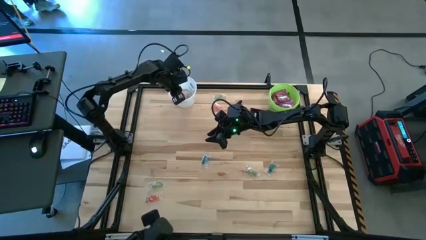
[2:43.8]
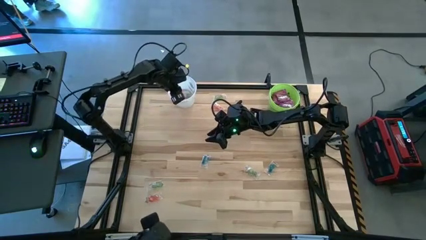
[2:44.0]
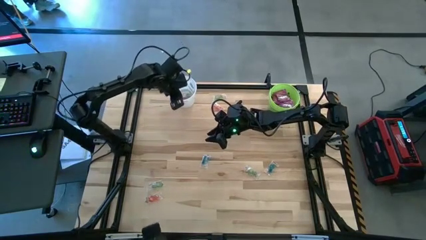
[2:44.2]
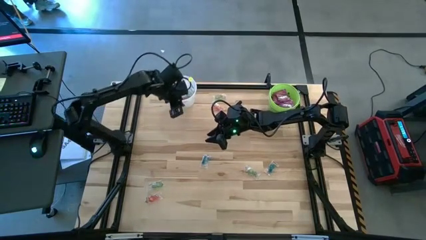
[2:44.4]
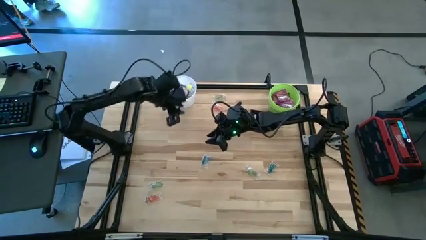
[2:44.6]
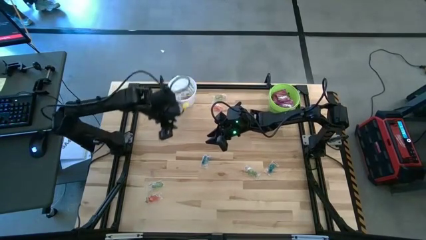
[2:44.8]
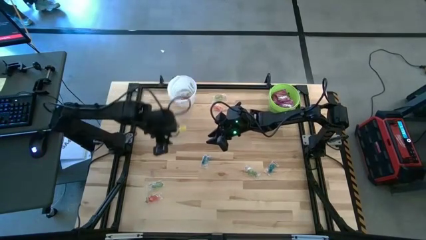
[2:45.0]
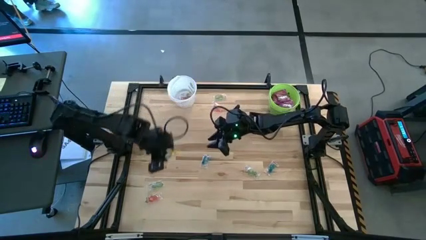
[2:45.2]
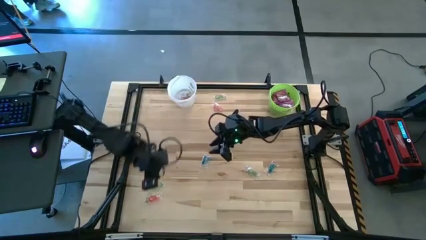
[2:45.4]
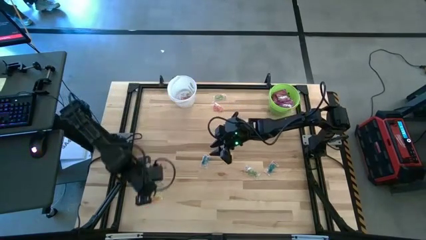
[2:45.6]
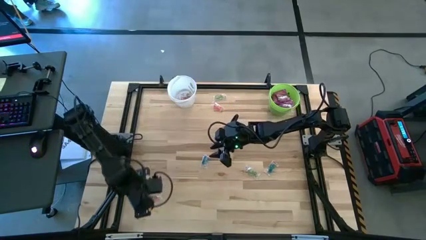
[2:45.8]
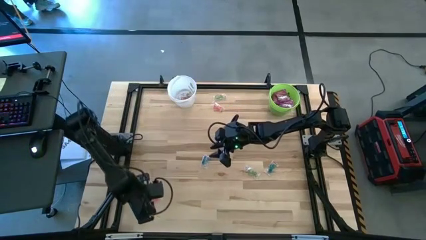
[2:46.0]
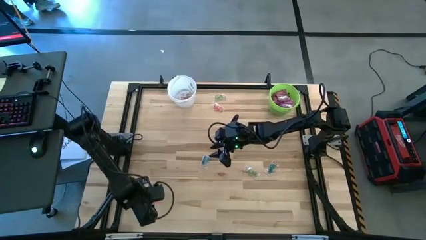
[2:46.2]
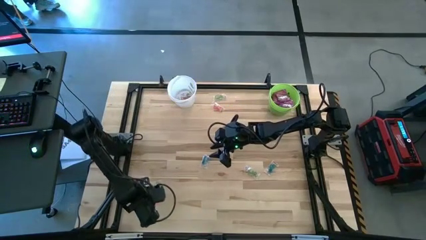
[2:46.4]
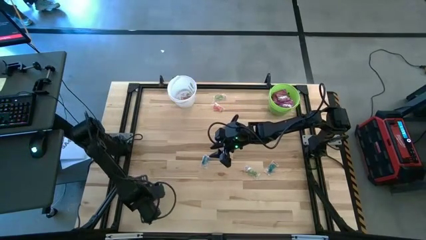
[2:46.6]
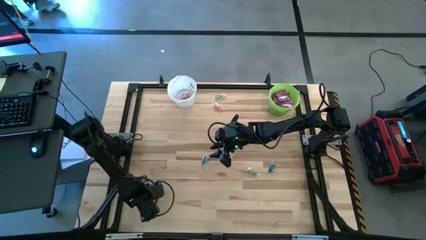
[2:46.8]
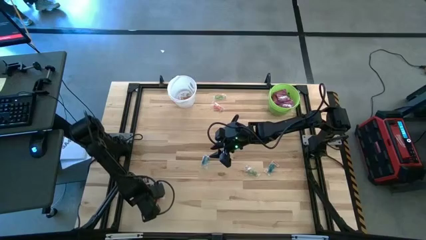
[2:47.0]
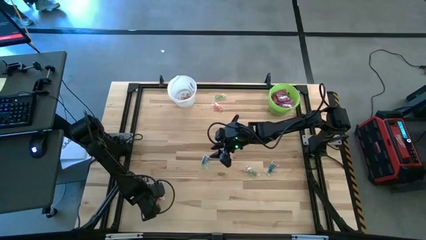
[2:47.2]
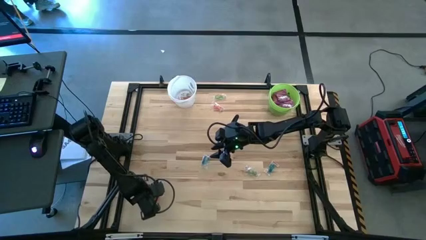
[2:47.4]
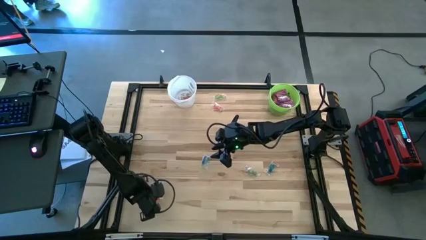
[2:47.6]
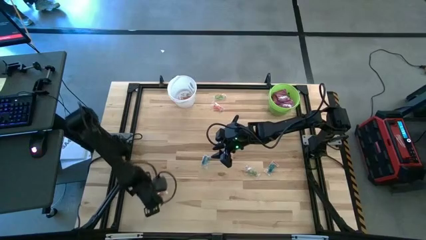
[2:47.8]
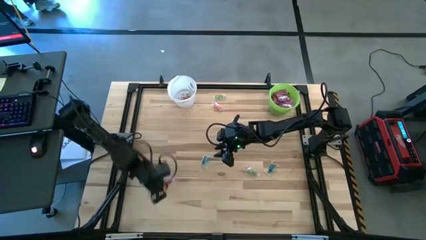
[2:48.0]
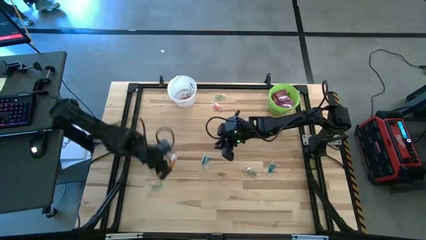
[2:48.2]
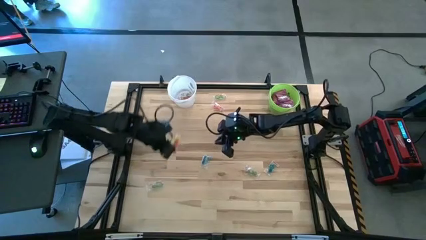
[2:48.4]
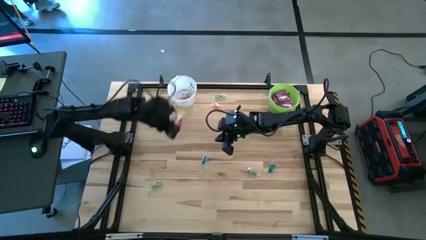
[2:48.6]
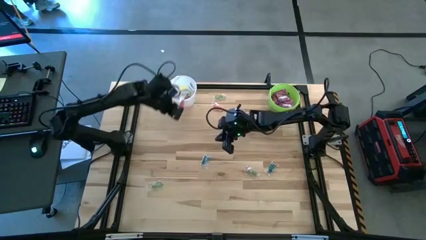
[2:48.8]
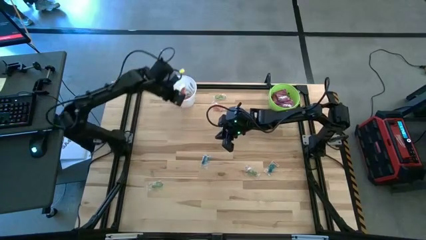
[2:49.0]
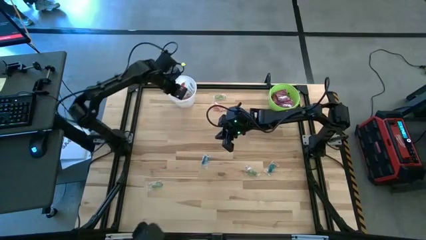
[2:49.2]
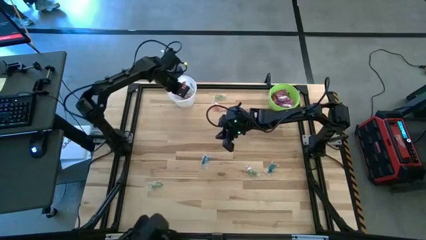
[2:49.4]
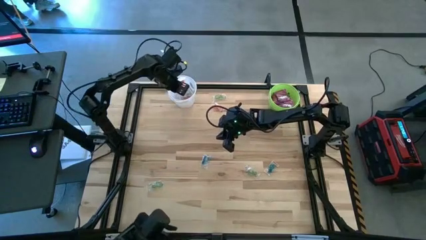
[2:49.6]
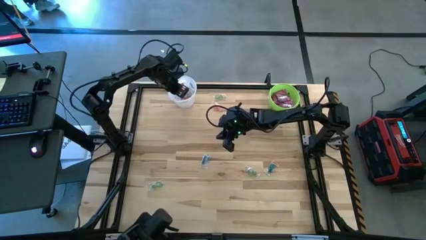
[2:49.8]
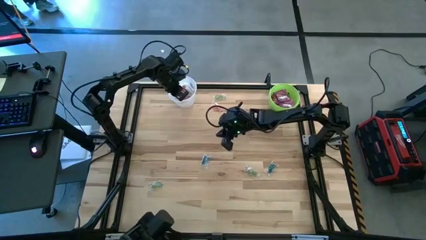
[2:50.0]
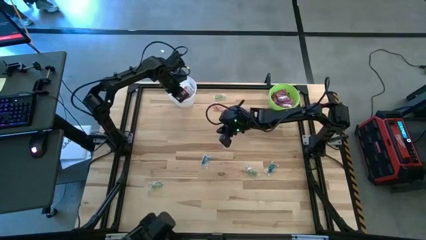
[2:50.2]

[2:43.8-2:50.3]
Task: Sort candy by brand, put in halloween buckets
Put the red gummy into the white bucket

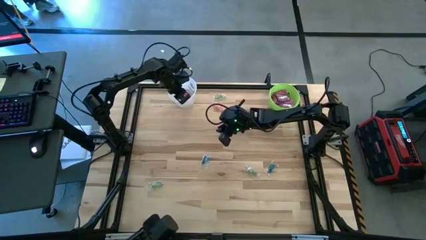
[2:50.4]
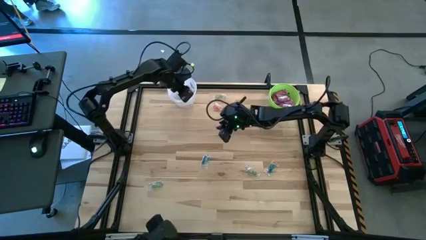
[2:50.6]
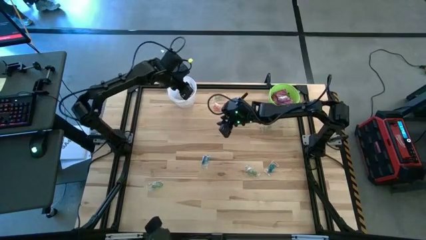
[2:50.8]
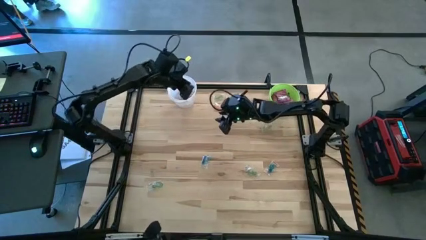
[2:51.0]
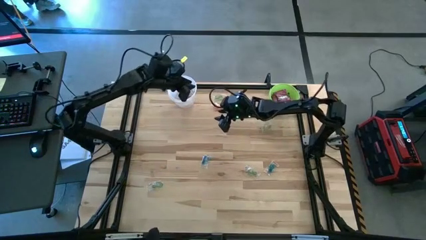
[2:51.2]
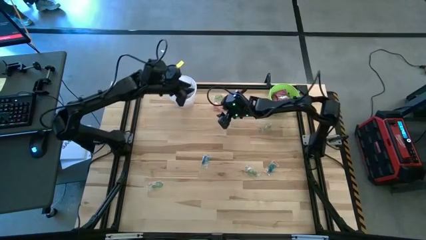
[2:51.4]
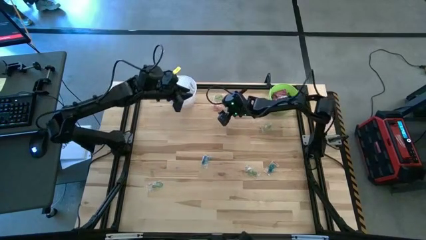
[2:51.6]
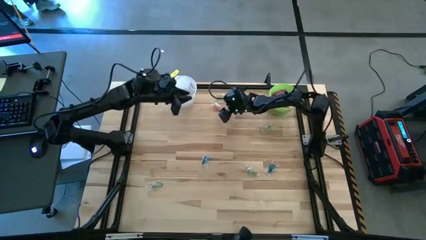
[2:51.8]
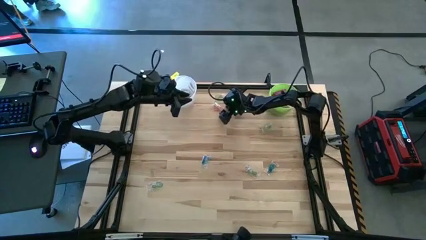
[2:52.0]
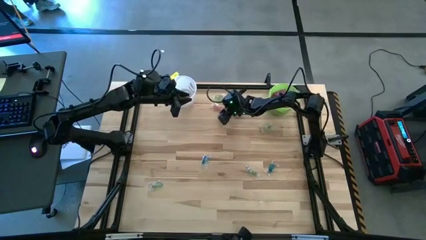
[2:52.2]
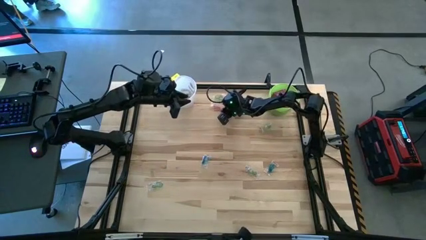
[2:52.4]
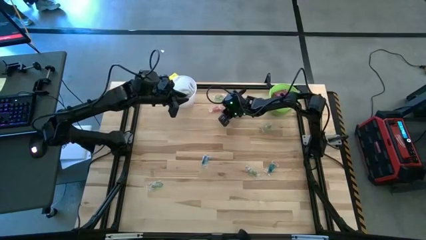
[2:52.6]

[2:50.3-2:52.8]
Put the red gummy into the white bucket

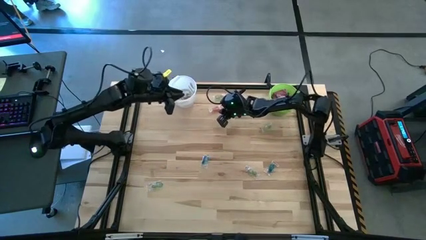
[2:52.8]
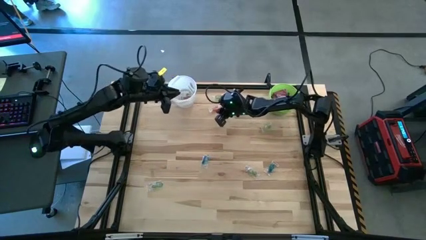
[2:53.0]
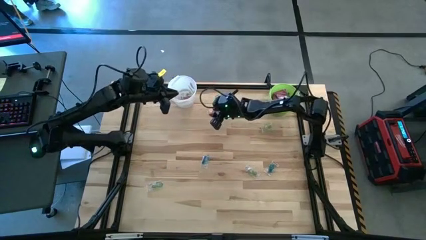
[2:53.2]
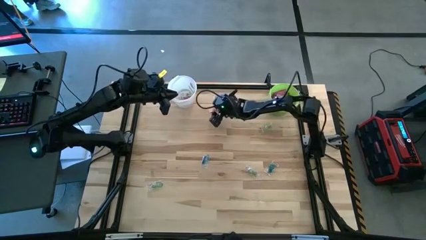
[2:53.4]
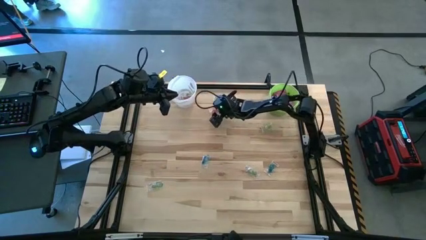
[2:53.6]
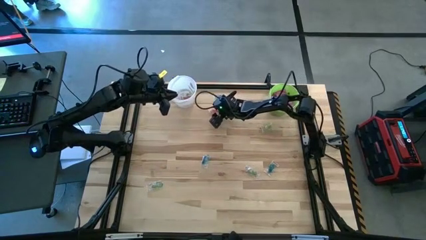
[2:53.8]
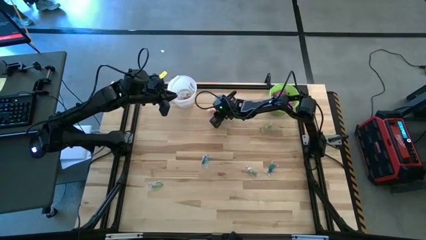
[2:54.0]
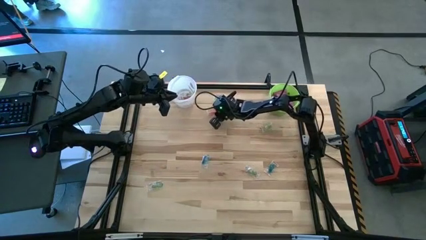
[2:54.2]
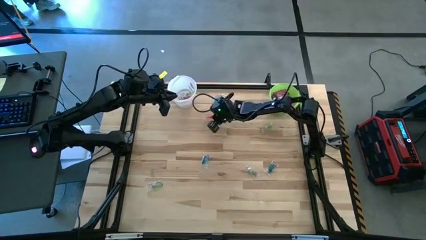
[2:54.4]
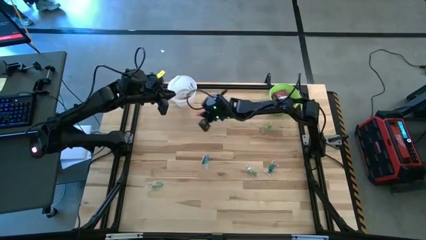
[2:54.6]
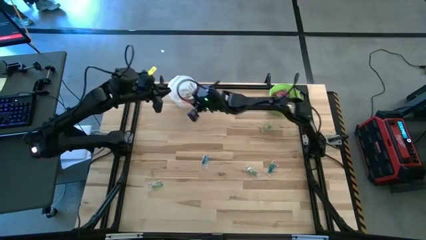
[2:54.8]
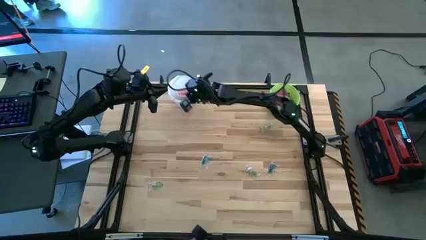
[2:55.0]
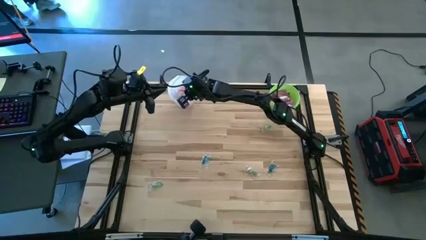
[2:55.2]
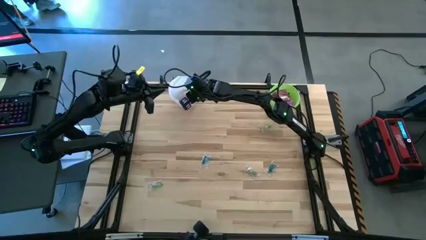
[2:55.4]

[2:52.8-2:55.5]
Put the red gummy into the white bucket

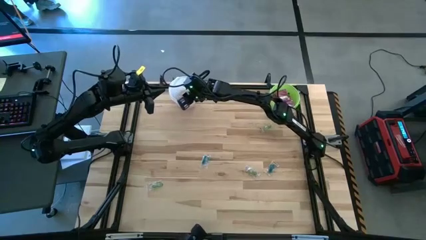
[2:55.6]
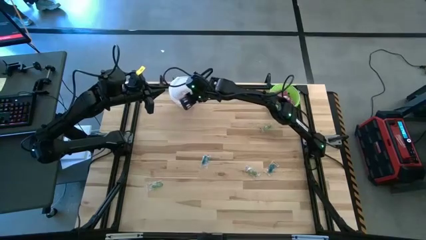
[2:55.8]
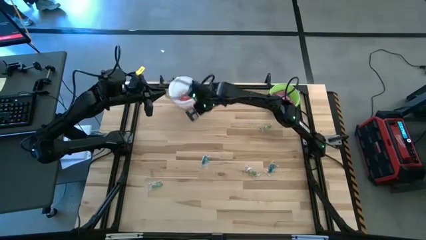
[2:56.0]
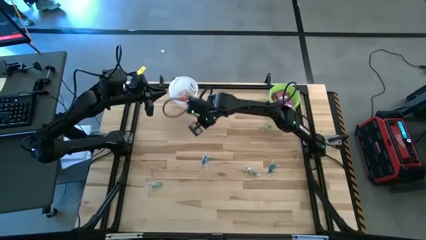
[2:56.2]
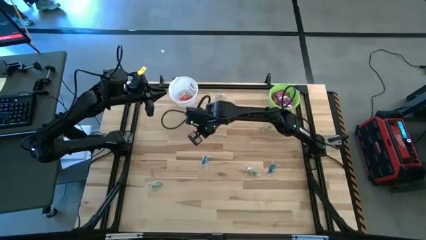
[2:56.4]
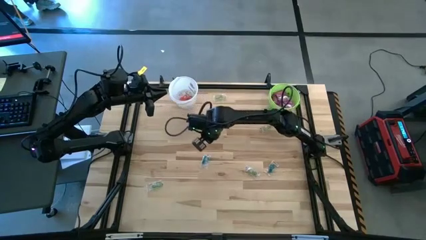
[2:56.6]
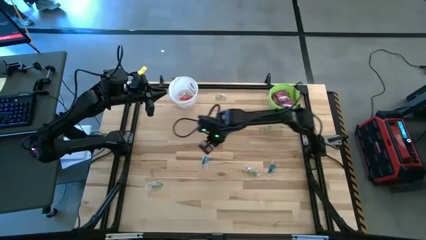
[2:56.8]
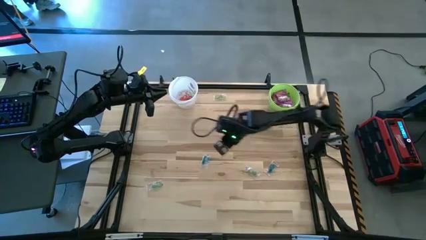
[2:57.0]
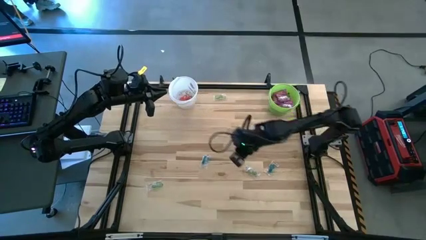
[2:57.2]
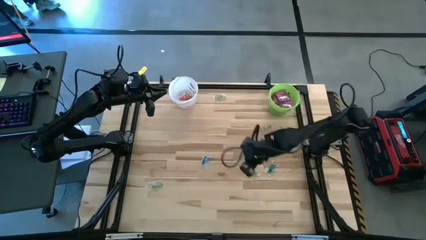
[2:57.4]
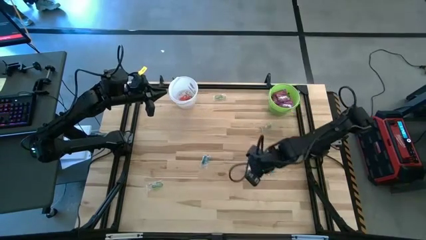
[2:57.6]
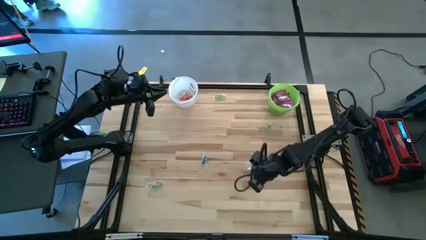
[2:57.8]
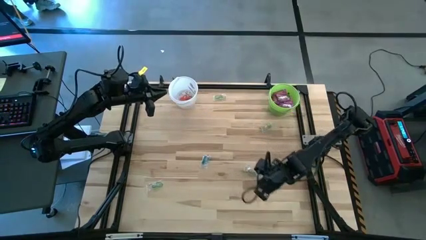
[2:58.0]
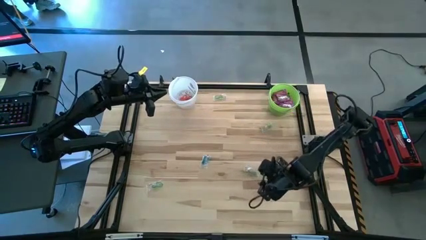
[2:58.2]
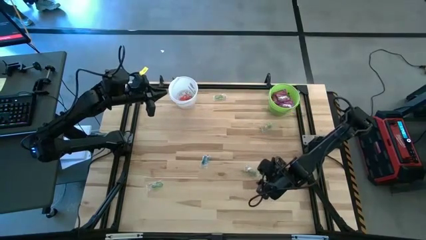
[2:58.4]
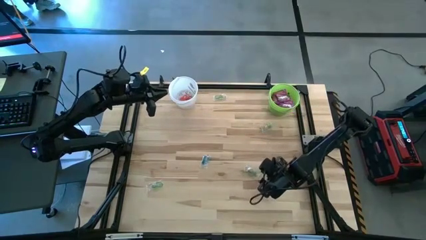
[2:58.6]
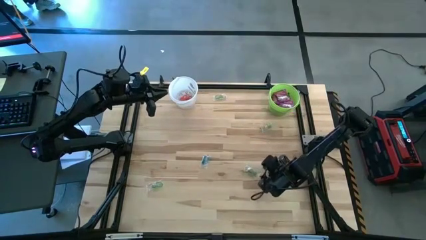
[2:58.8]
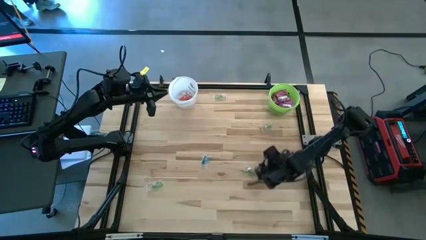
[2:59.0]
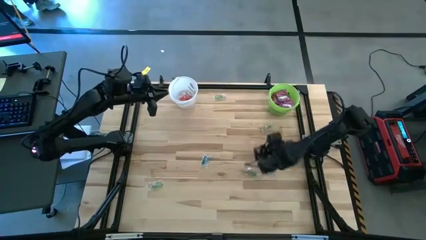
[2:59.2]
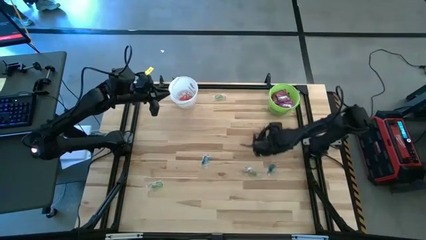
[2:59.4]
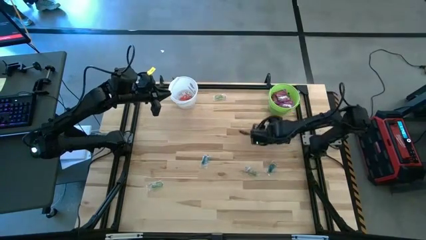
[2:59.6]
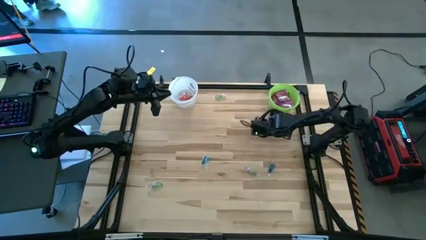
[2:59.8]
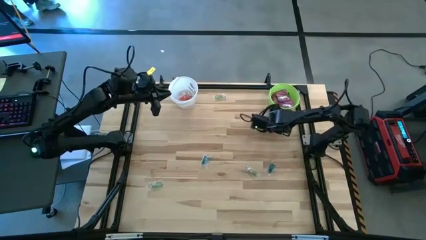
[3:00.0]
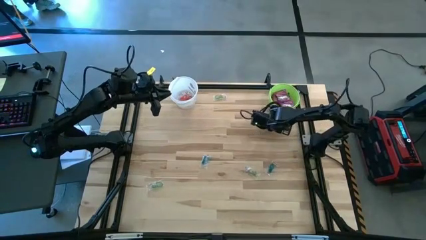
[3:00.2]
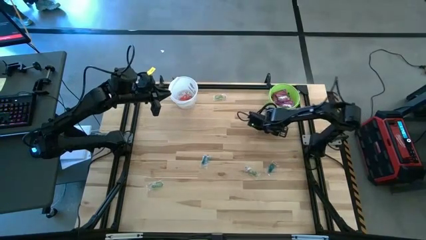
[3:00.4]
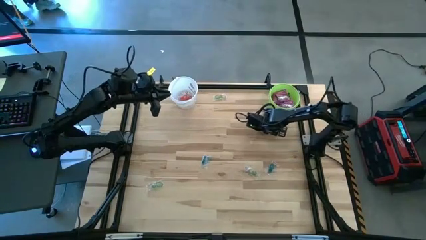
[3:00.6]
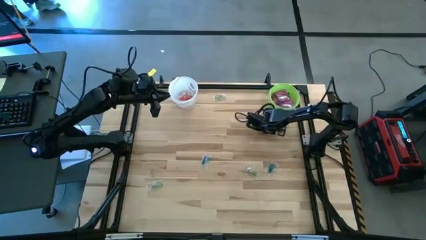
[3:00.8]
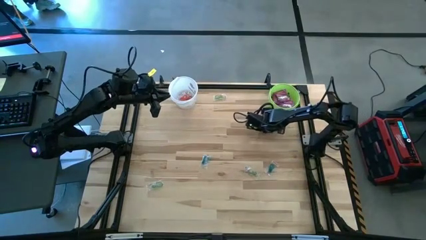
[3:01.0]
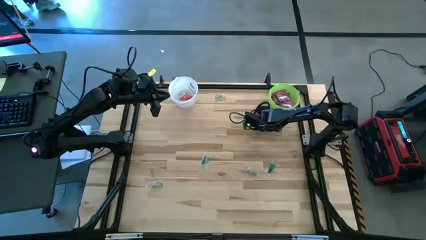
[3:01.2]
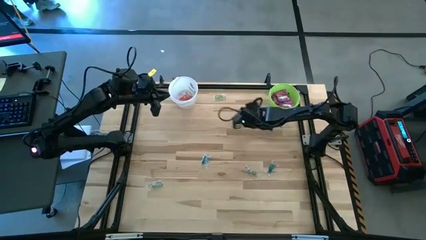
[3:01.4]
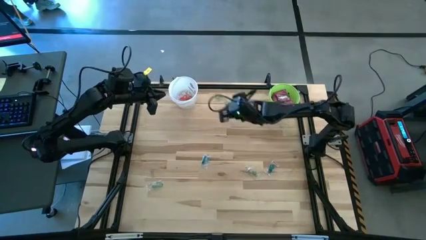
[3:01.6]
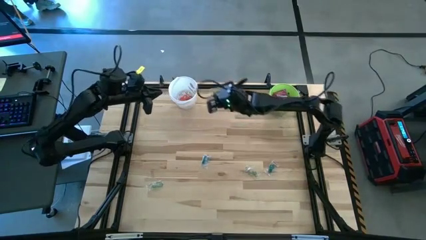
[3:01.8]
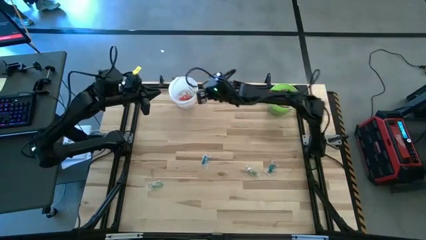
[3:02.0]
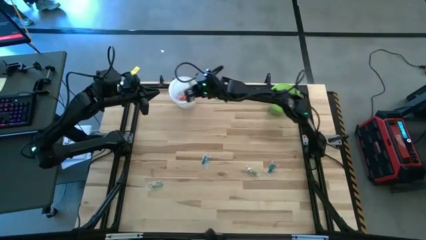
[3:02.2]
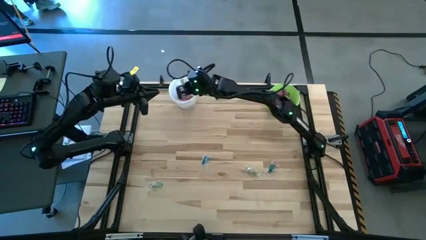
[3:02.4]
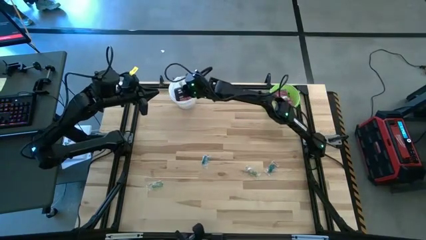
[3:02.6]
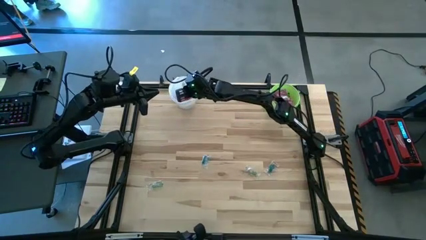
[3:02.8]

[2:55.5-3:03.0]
Put the green gummy into the white bucket
